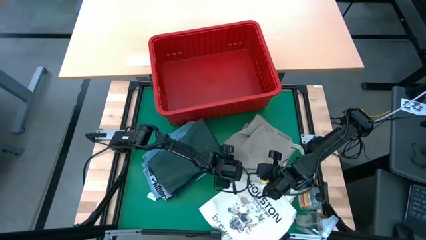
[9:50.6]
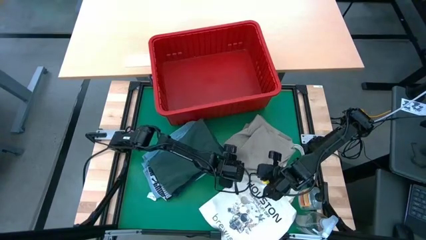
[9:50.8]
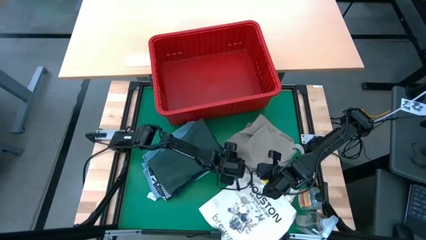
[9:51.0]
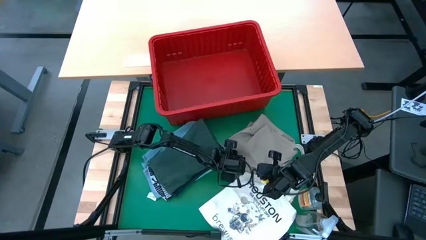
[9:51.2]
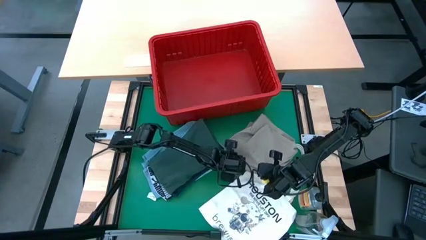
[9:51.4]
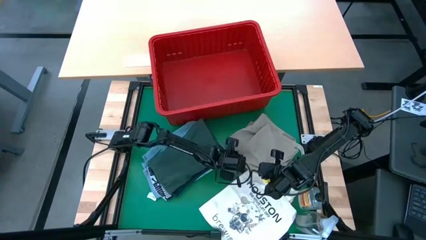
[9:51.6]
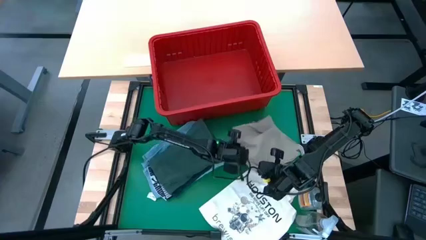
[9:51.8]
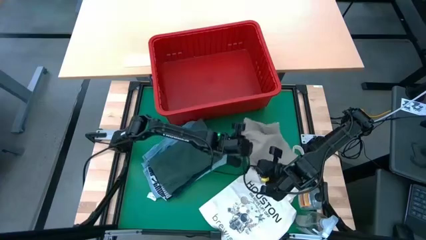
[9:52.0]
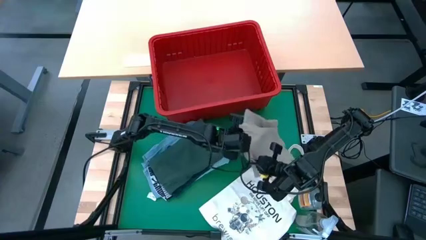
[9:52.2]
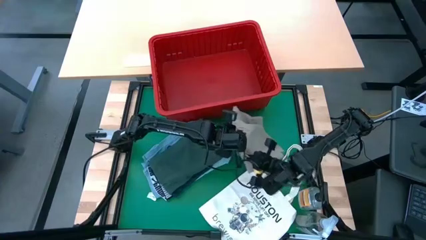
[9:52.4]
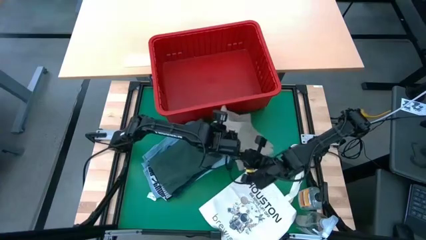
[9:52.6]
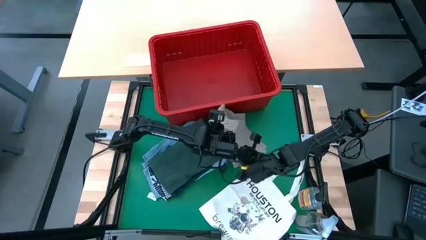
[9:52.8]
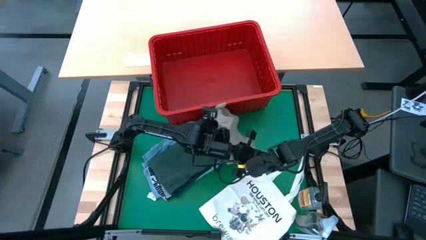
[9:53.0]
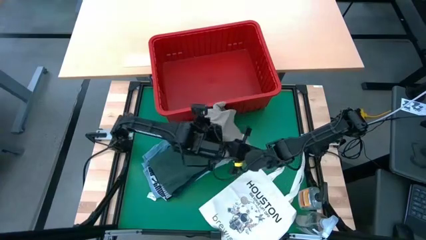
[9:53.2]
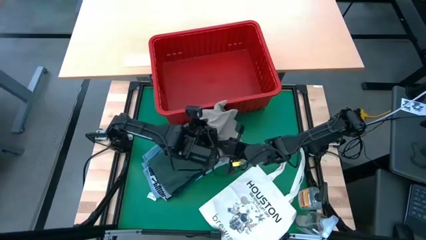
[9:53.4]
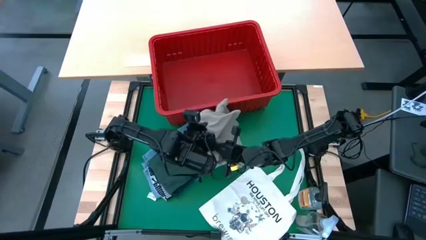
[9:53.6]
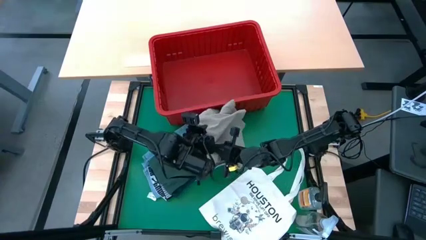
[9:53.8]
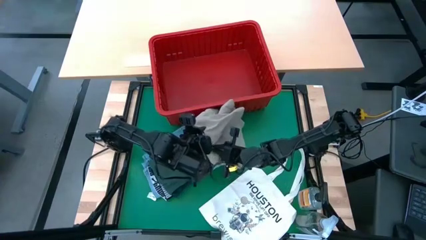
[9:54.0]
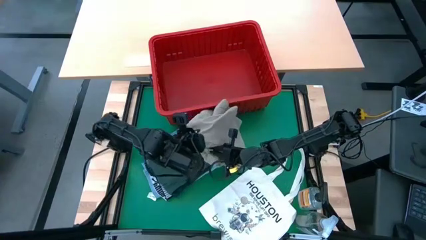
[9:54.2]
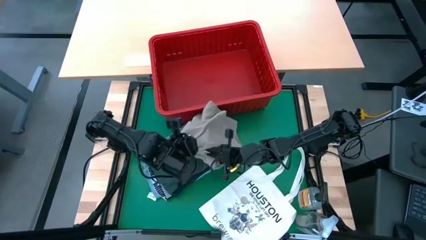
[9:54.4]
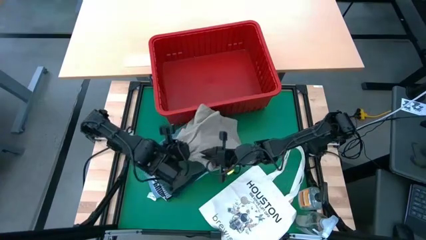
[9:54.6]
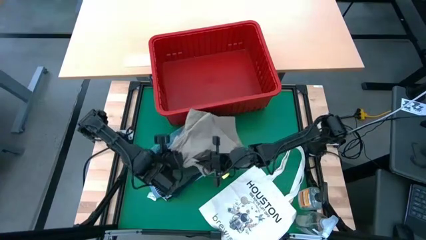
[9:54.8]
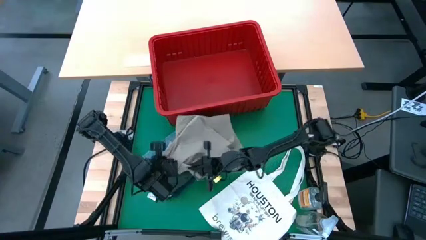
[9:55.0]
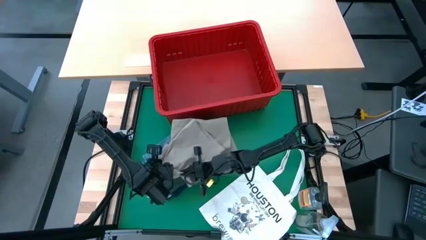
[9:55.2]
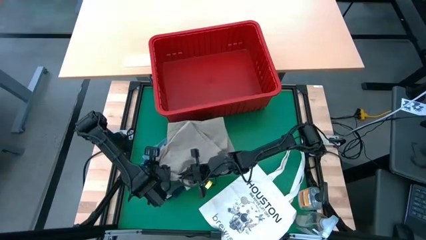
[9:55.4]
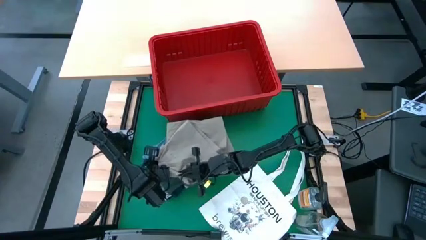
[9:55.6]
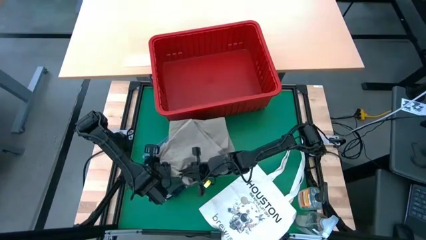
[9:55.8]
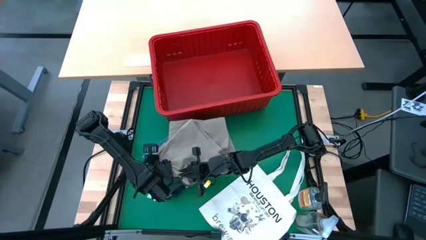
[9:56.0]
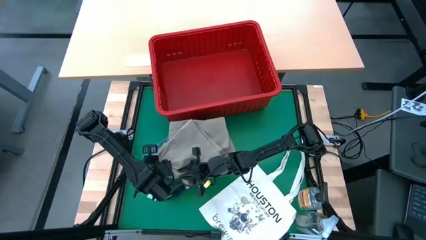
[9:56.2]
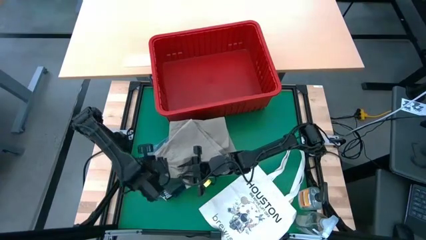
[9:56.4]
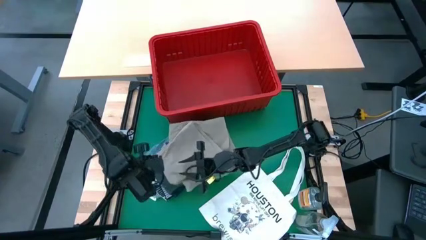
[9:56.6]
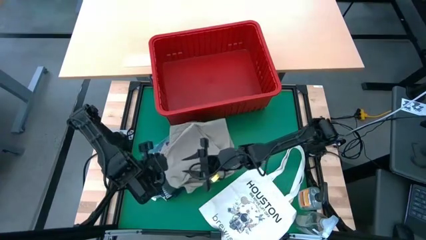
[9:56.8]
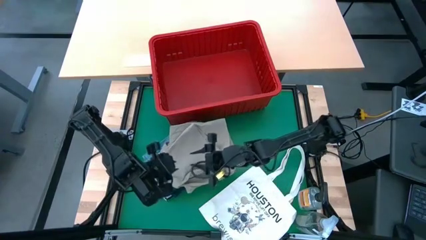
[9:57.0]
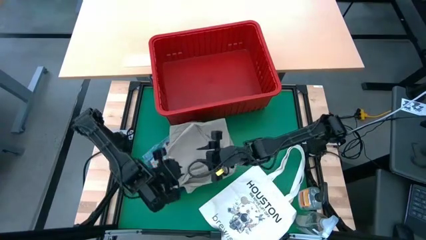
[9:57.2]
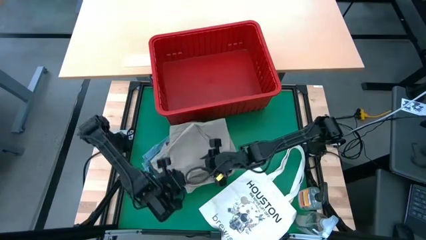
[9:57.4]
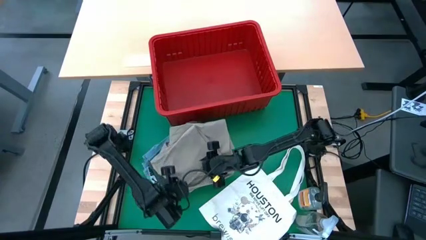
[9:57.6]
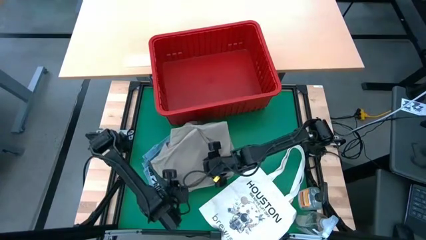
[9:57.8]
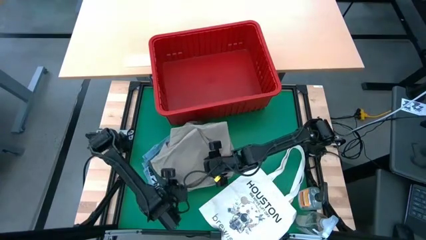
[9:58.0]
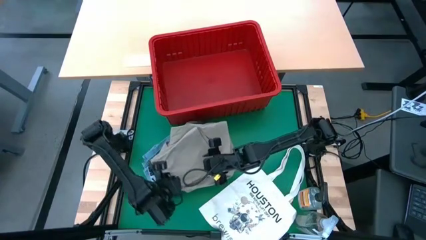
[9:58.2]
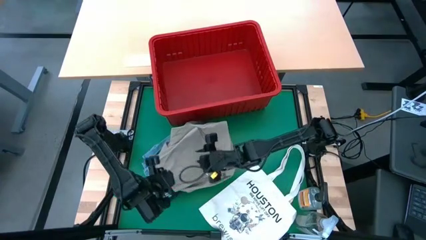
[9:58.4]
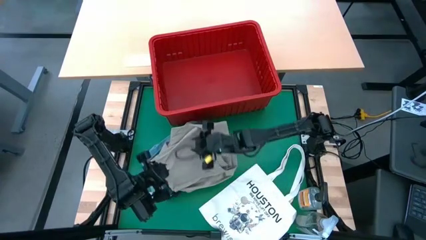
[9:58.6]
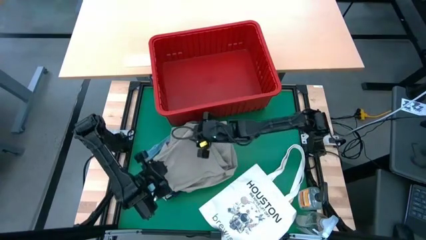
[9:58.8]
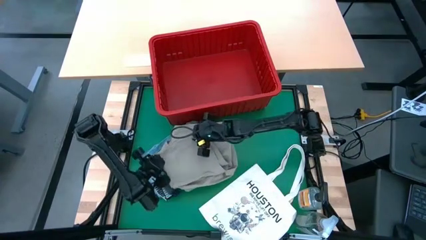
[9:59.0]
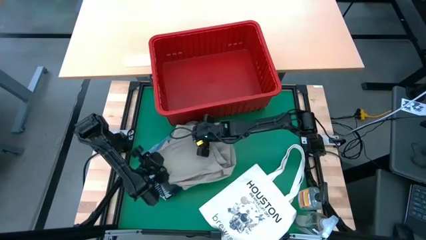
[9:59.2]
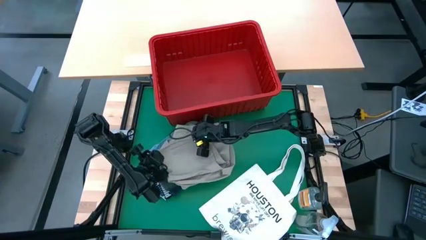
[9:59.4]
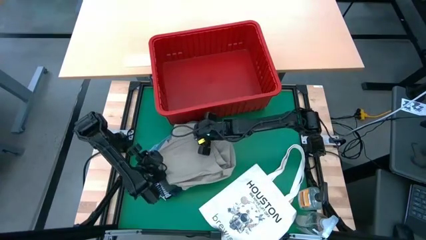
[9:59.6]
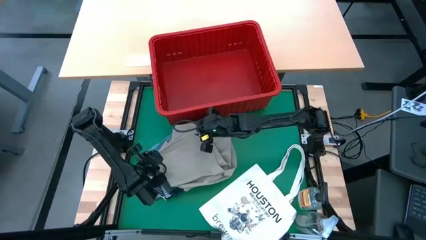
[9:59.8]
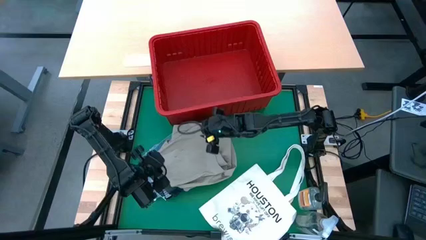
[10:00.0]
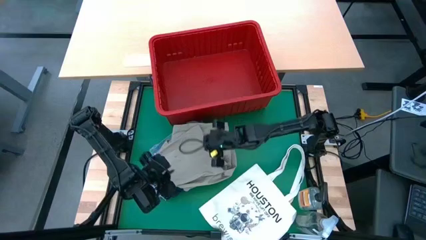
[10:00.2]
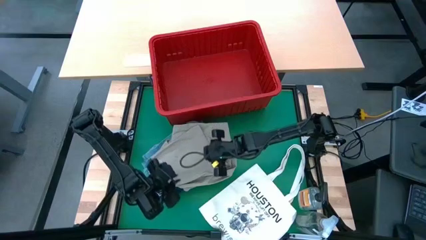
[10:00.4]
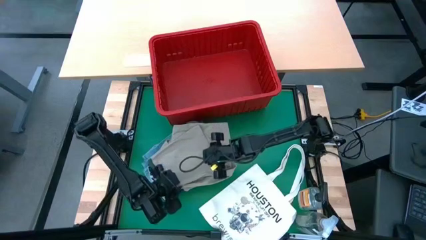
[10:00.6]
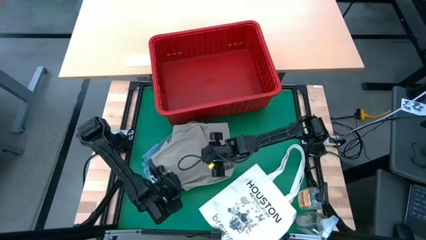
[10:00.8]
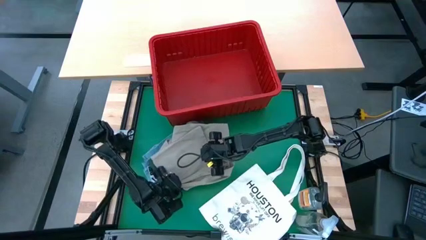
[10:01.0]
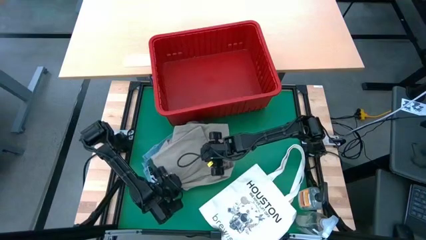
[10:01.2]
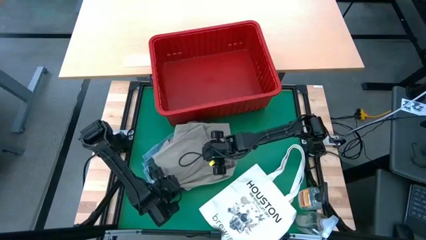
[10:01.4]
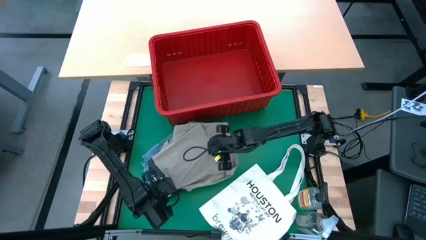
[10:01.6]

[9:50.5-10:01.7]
Task: Fold Laundry from Bin
Stack the light brown shorts on top of the dark green shirt

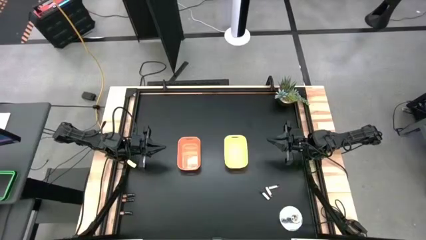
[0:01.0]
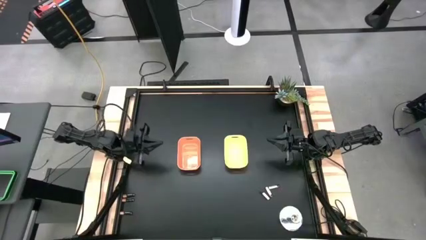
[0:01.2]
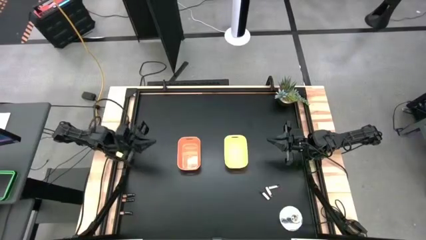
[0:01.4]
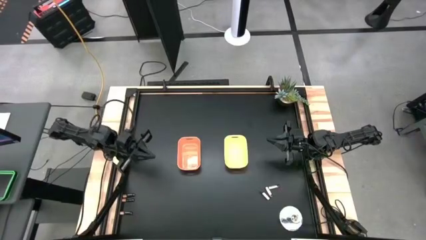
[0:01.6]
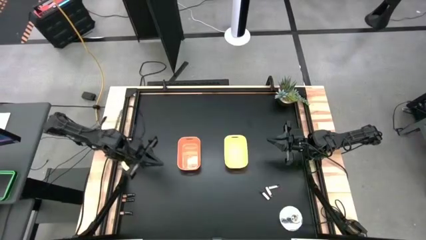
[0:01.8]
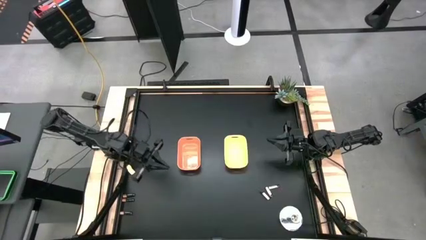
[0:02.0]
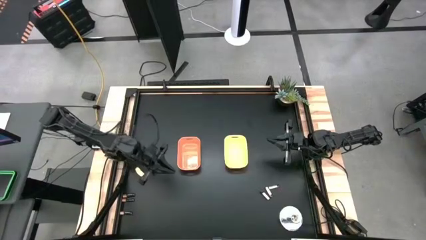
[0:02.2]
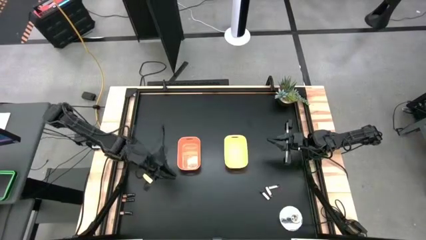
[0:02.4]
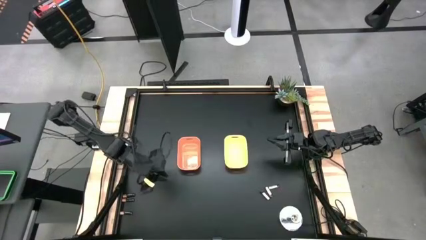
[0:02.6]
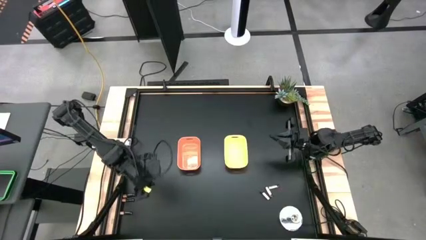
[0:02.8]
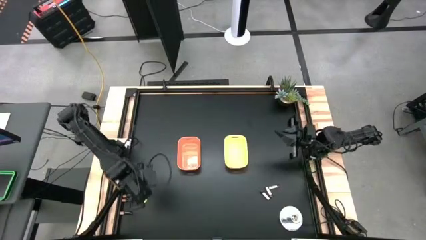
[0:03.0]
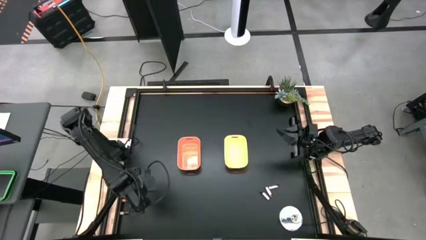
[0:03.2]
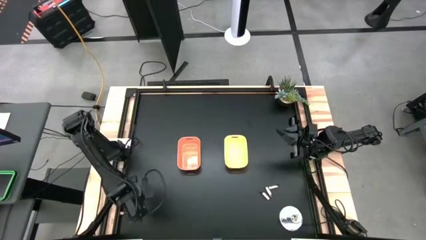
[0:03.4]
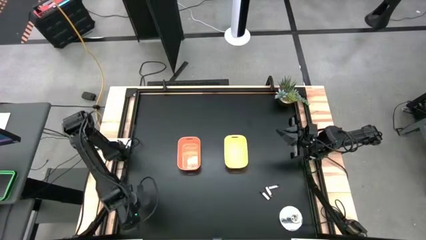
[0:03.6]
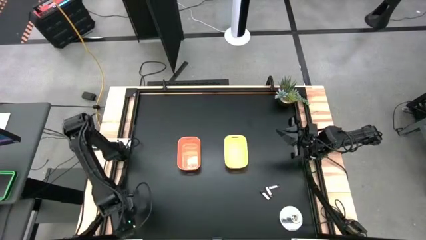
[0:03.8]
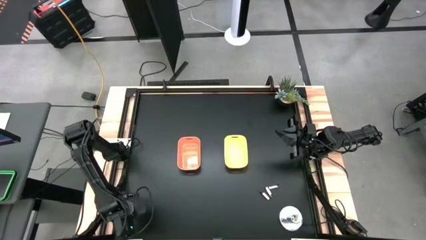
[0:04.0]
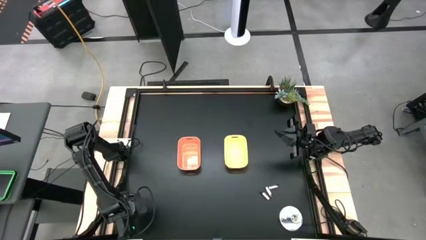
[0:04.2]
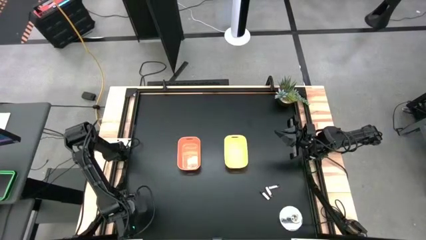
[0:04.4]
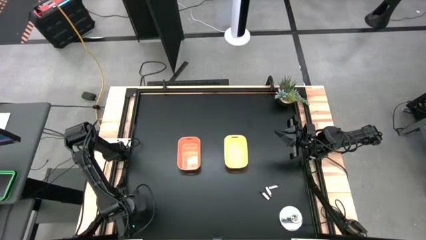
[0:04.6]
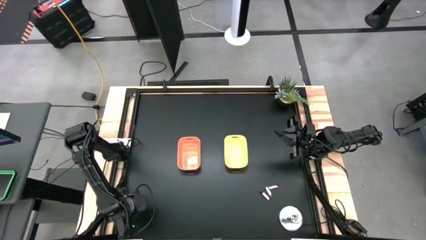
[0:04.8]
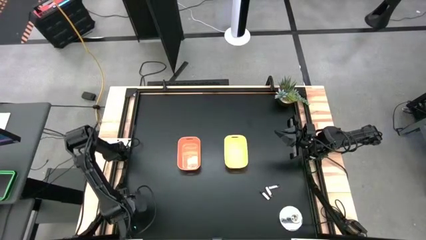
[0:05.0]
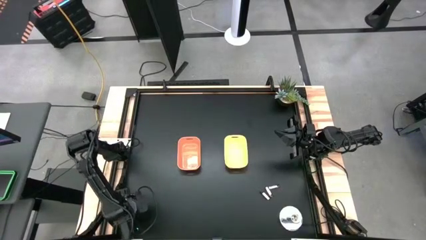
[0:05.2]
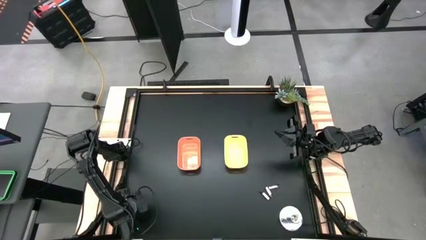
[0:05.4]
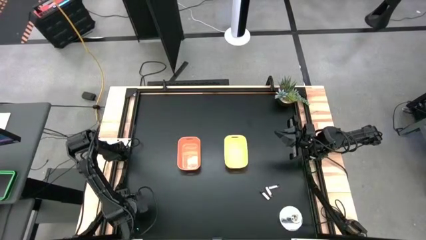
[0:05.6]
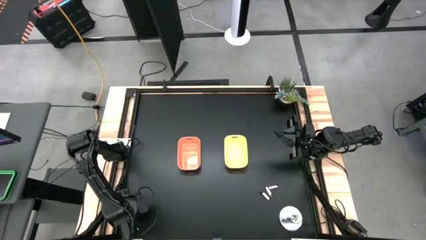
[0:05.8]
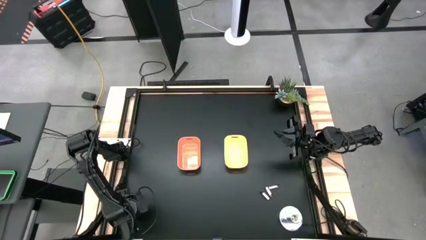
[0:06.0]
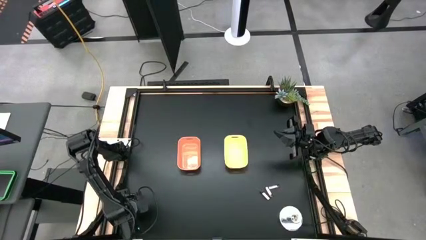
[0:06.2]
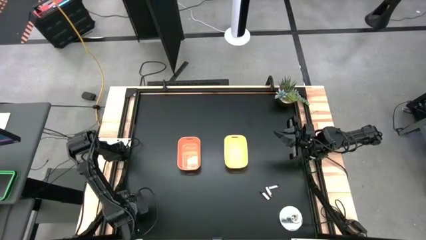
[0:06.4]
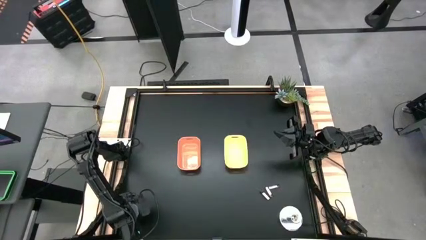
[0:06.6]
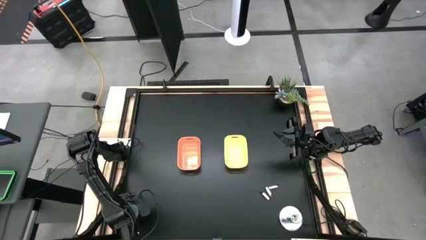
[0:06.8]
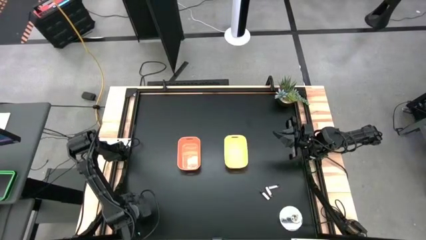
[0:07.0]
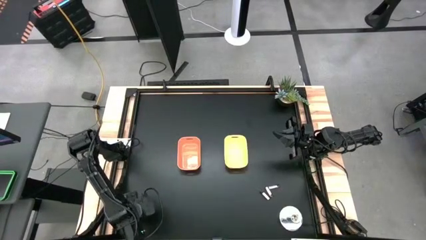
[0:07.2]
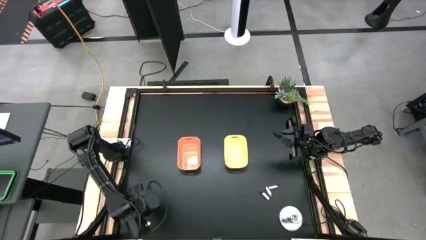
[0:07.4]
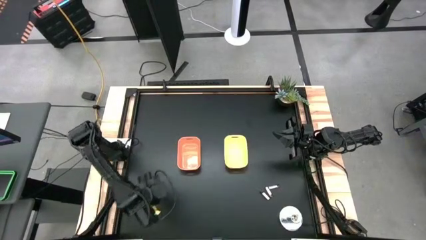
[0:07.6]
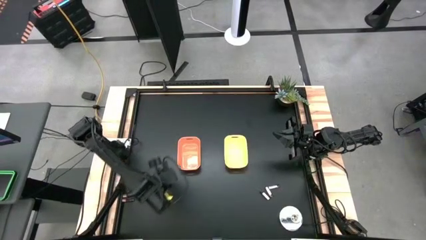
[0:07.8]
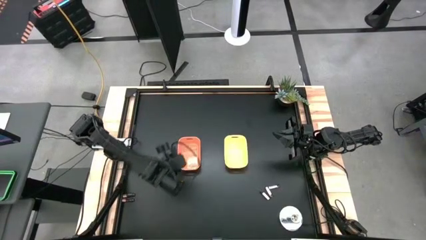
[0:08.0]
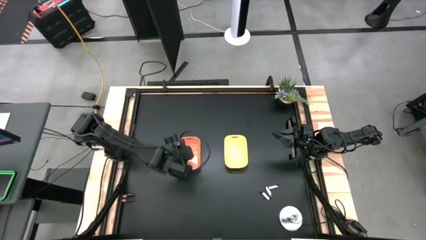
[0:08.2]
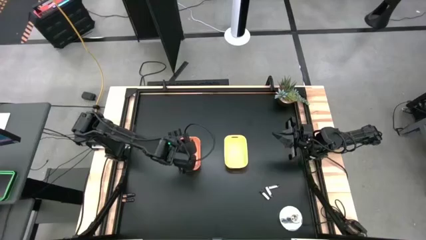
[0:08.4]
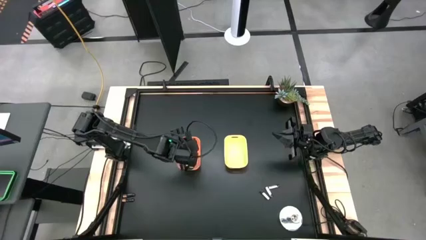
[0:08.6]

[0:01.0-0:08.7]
Task: Sort batteries
Put the bottom black battery into the orange bin
